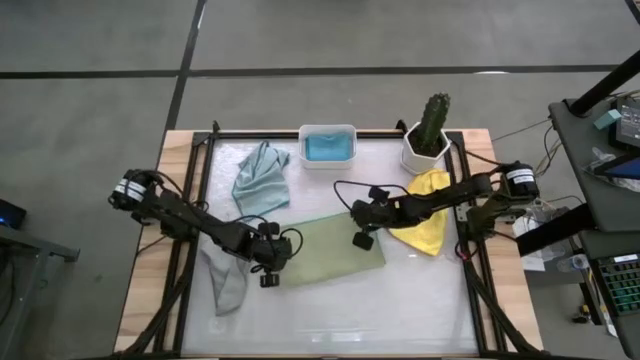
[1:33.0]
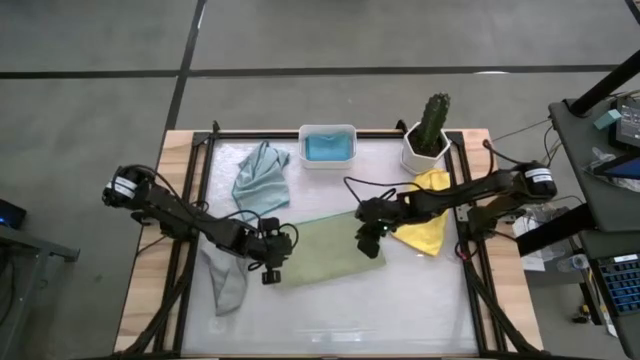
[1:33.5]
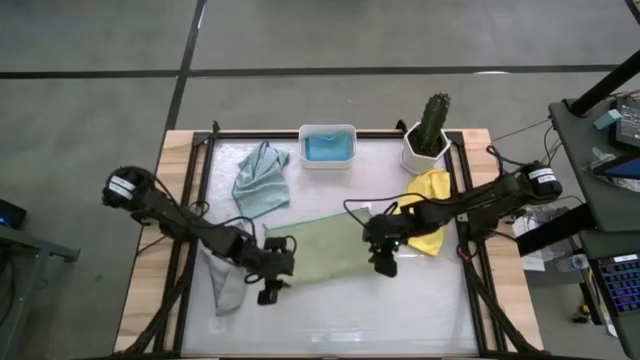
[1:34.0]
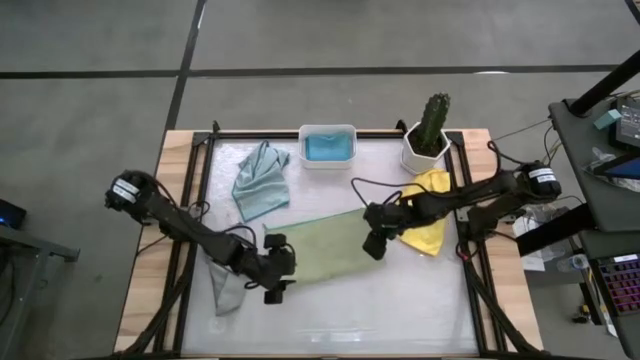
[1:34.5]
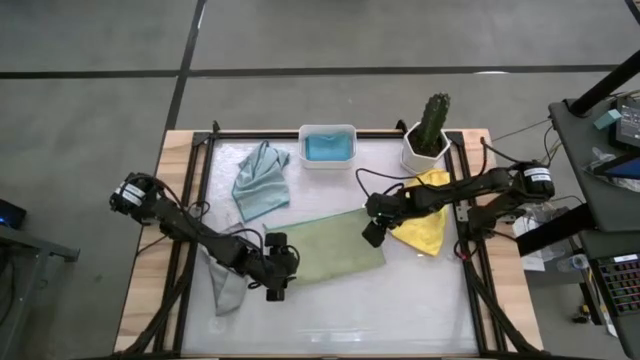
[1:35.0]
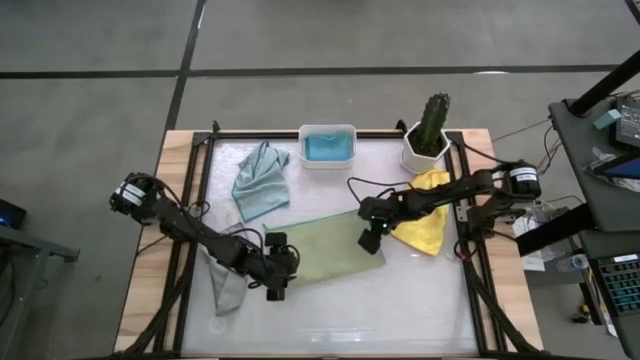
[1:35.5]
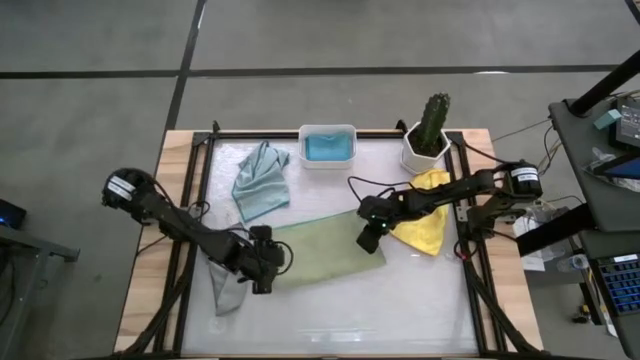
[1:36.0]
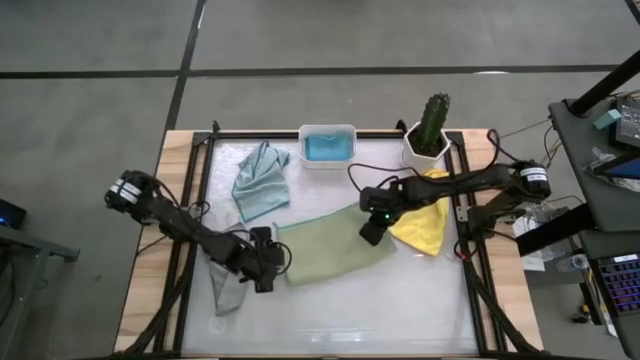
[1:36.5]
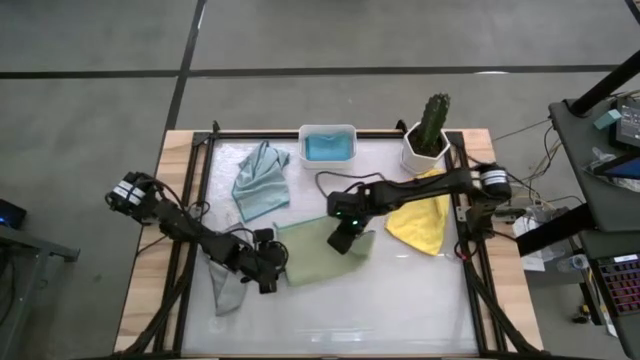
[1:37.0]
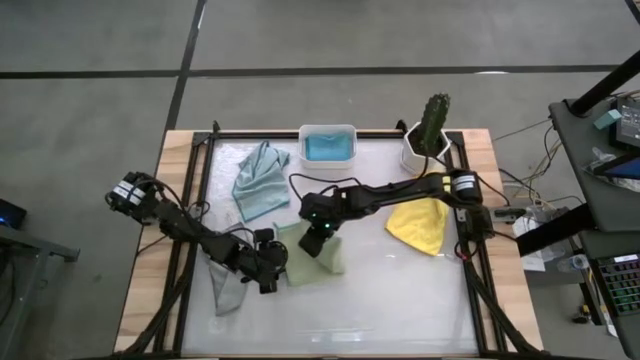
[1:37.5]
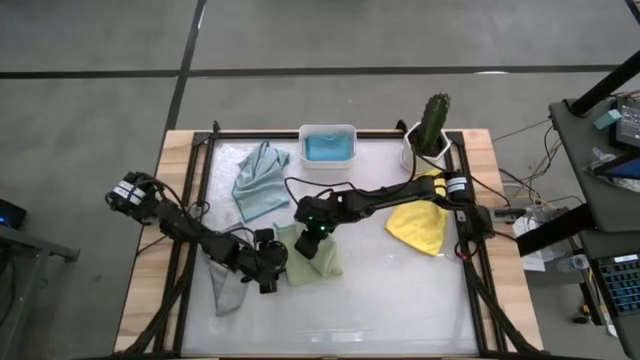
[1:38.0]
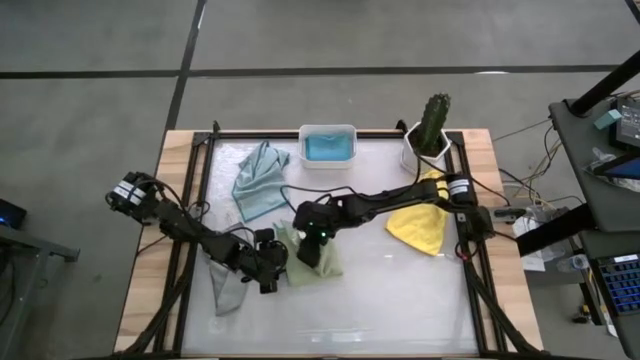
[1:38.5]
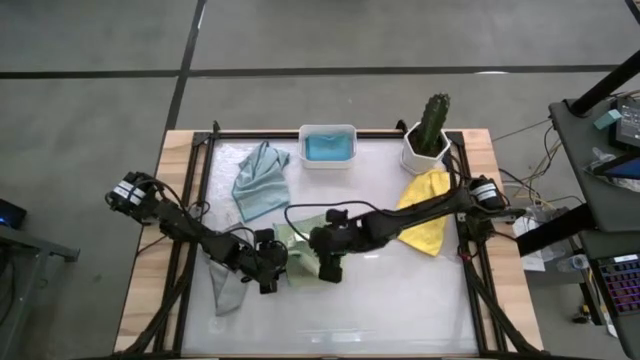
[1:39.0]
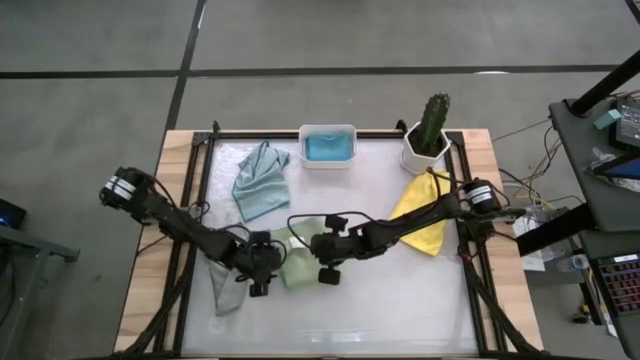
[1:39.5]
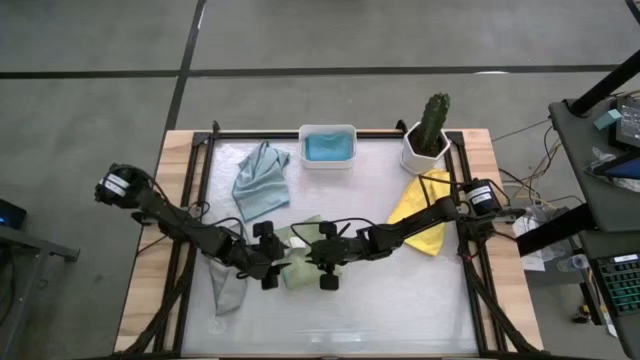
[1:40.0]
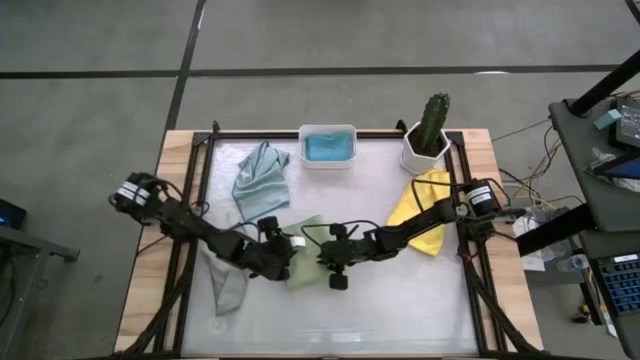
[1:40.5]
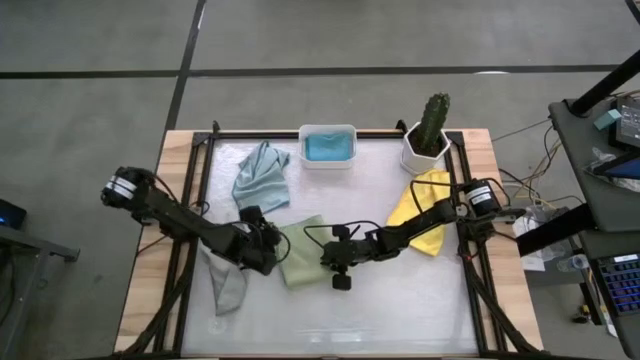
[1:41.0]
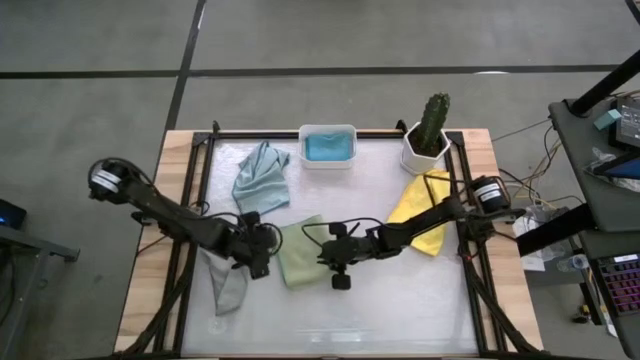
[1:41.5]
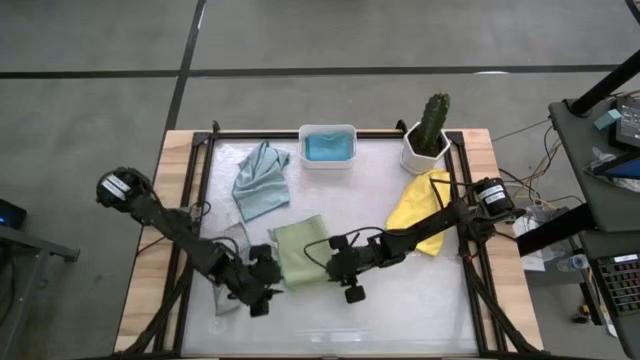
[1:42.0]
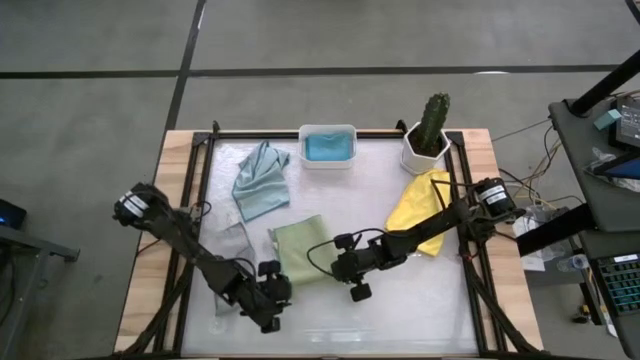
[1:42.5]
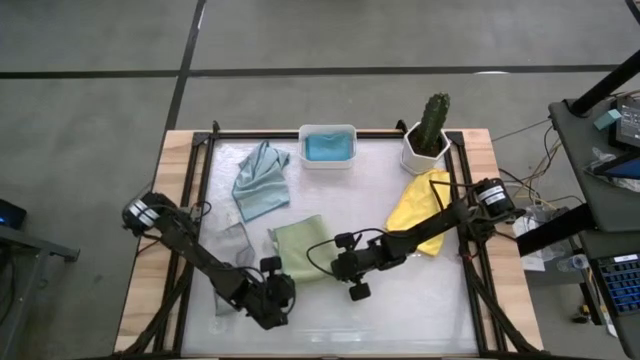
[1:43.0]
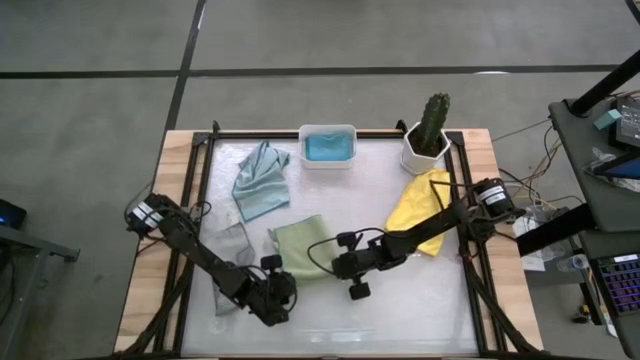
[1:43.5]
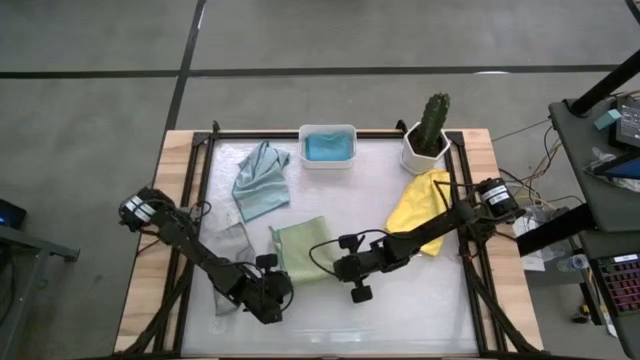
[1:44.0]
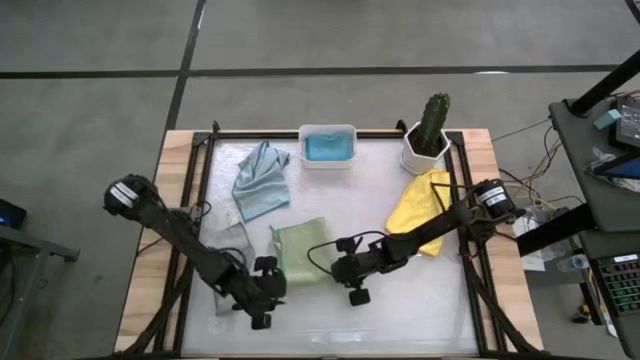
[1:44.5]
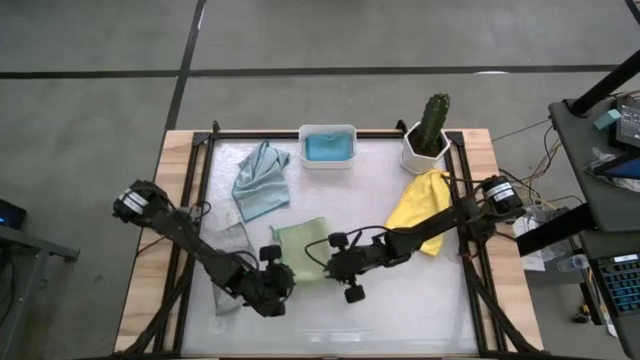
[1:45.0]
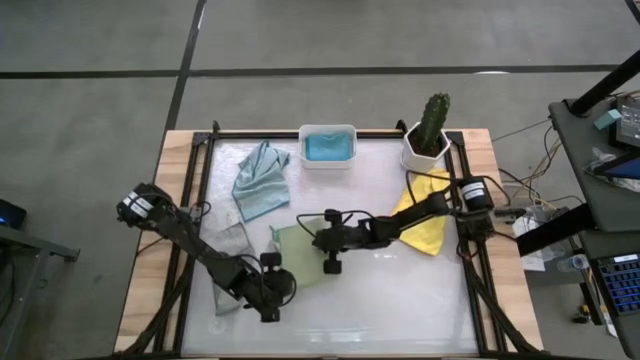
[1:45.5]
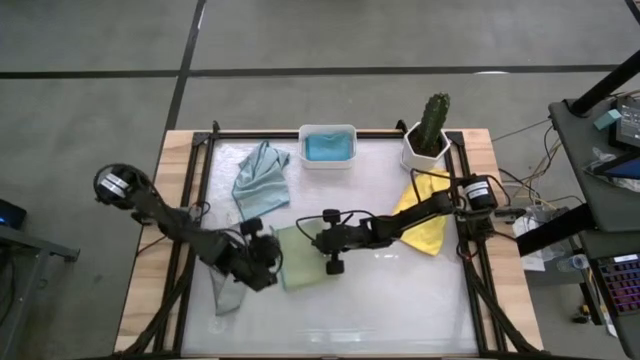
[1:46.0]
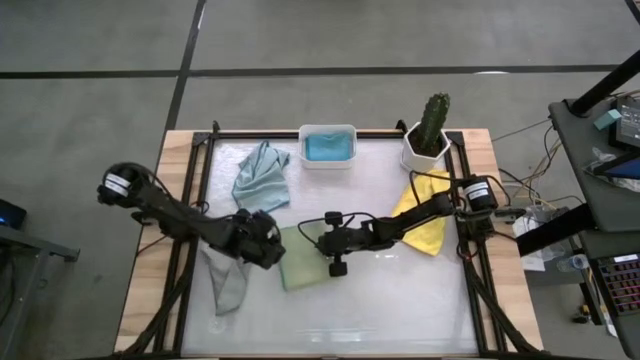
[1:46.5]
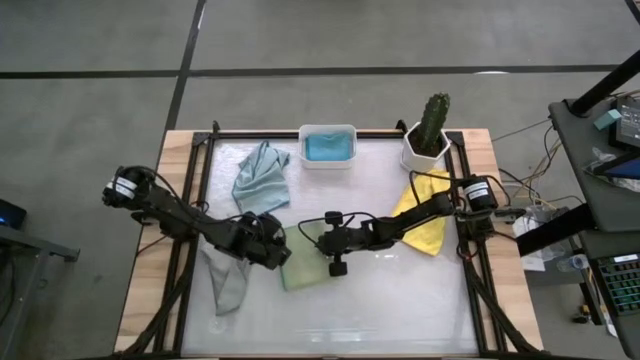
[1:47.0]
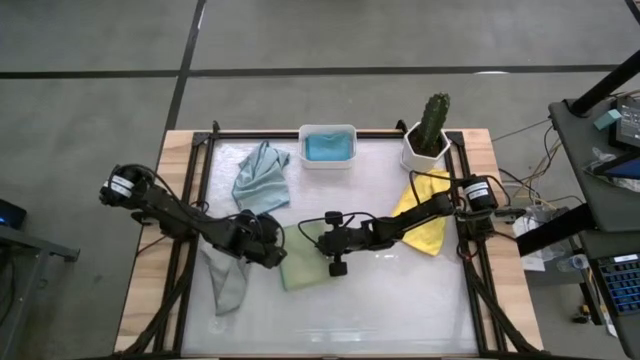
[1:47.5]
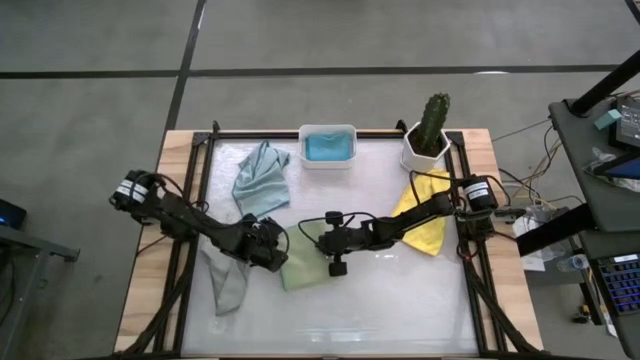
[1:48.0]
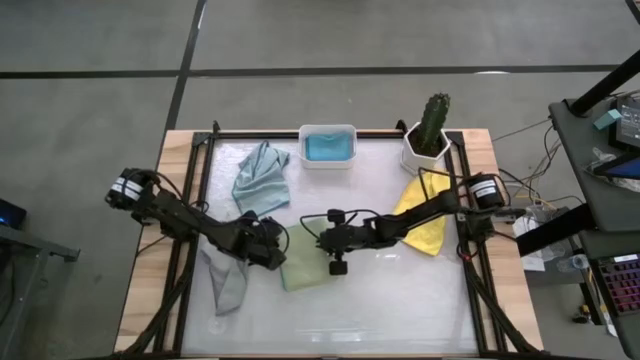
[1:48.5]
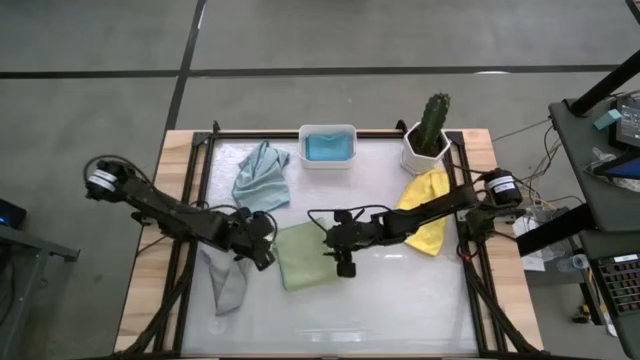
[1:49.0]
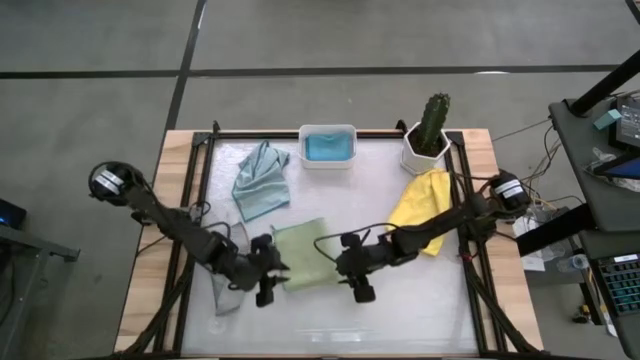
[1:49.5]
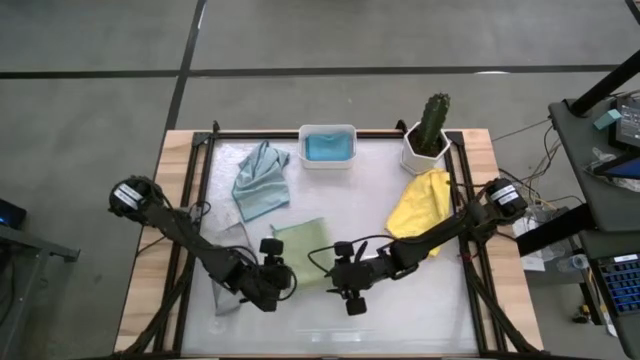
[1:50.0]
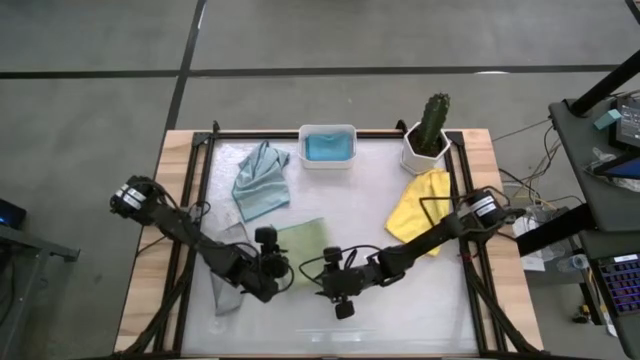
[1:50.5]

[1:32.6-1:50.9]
Task: Fold microfiber towels
Fold the green cloth
